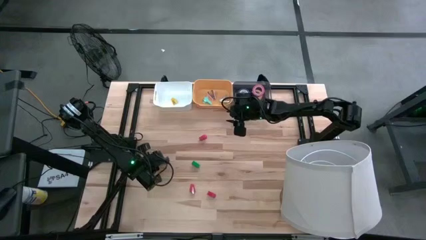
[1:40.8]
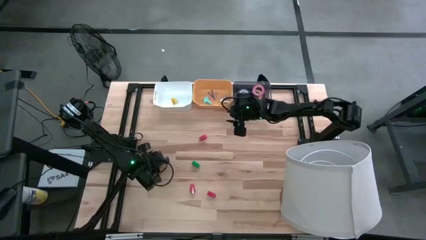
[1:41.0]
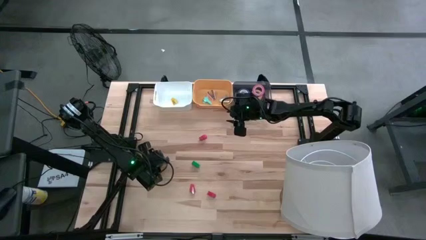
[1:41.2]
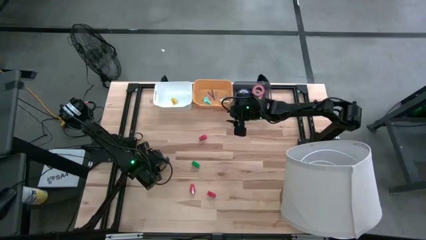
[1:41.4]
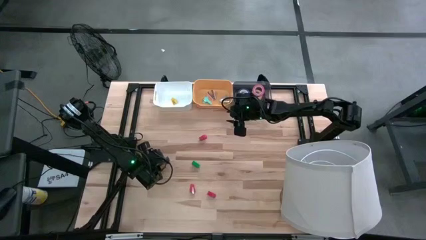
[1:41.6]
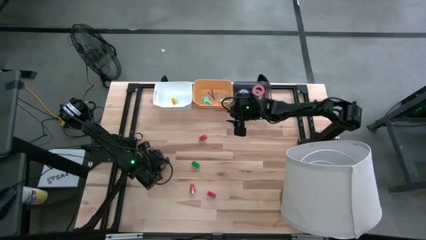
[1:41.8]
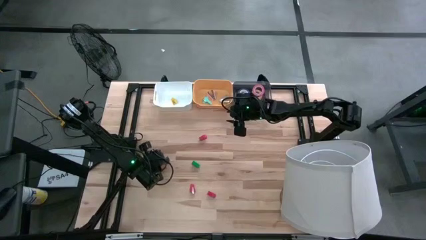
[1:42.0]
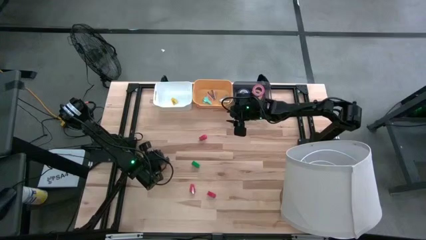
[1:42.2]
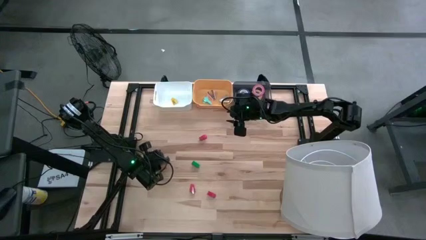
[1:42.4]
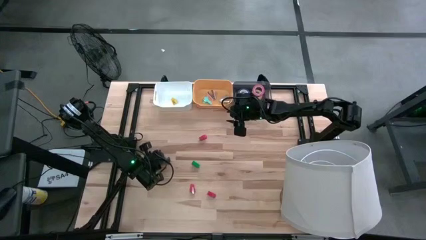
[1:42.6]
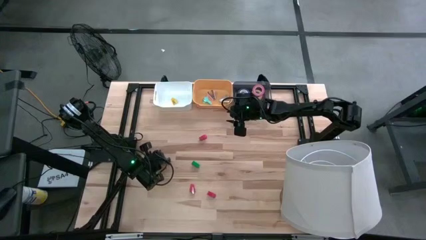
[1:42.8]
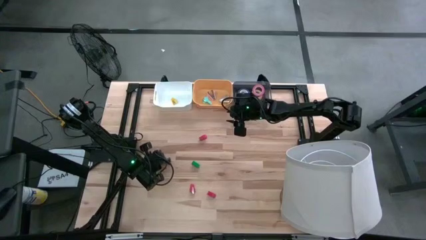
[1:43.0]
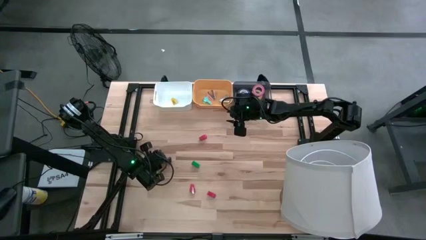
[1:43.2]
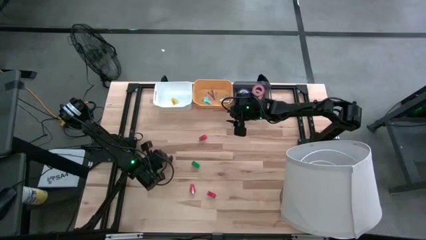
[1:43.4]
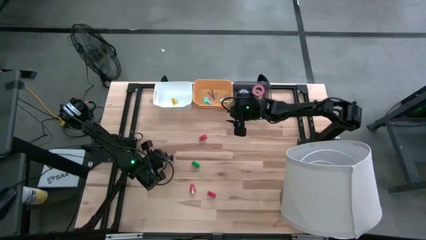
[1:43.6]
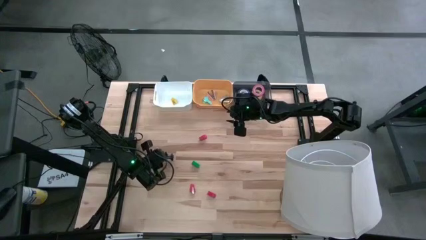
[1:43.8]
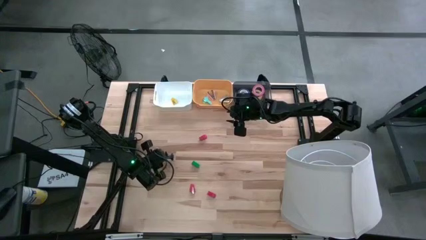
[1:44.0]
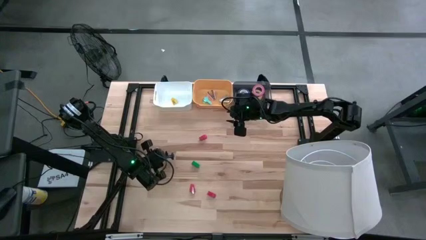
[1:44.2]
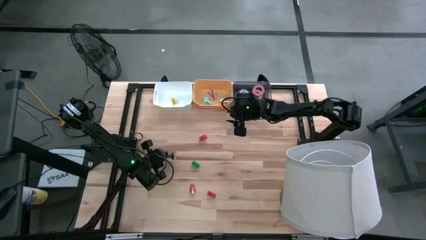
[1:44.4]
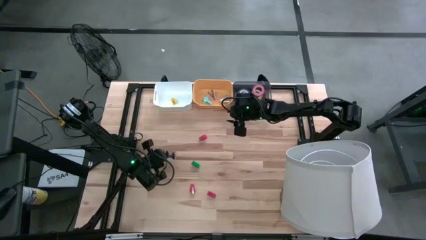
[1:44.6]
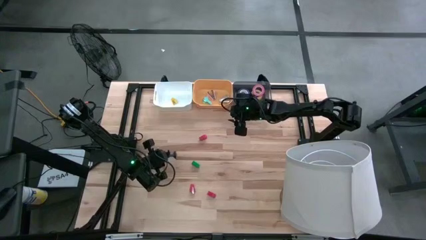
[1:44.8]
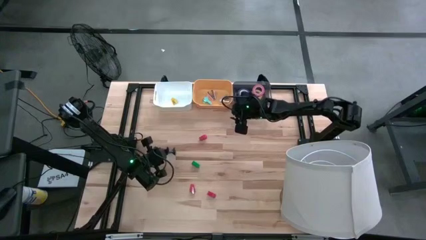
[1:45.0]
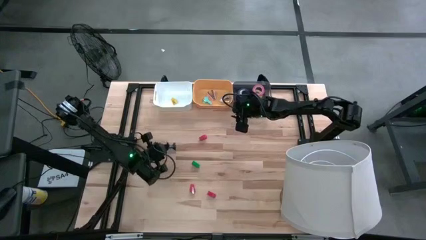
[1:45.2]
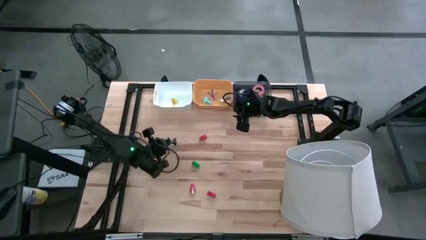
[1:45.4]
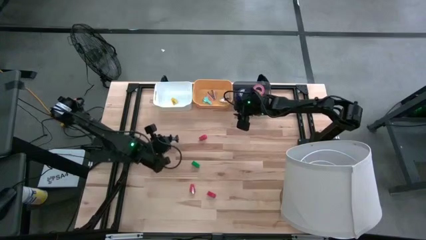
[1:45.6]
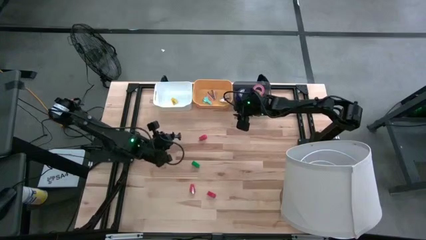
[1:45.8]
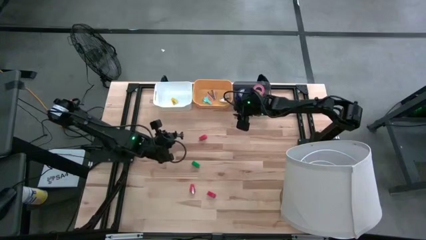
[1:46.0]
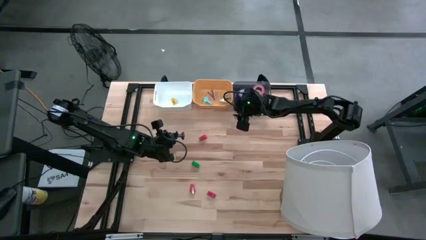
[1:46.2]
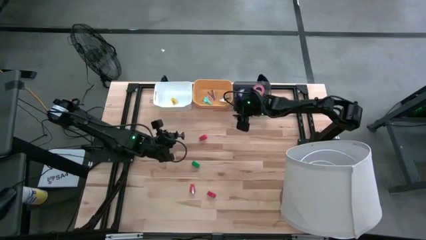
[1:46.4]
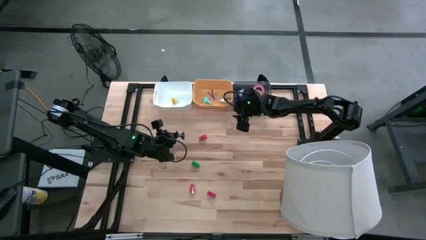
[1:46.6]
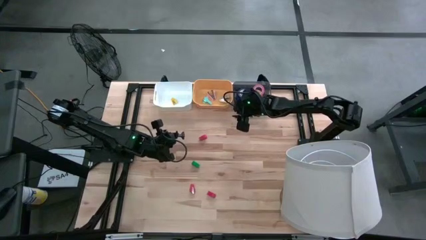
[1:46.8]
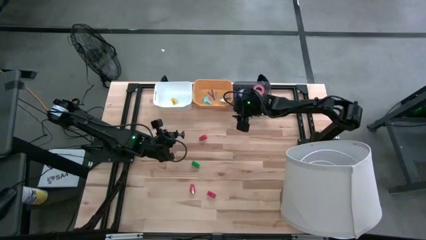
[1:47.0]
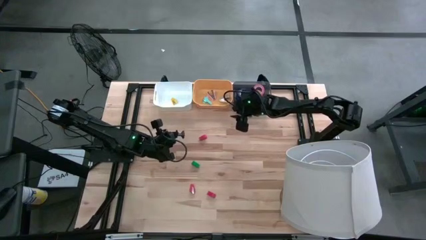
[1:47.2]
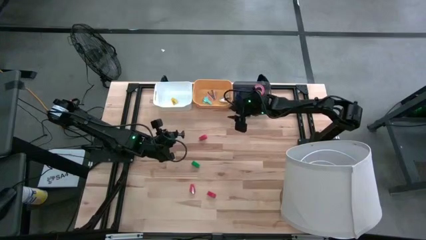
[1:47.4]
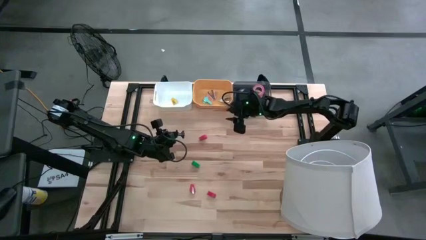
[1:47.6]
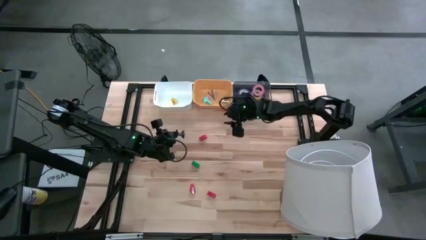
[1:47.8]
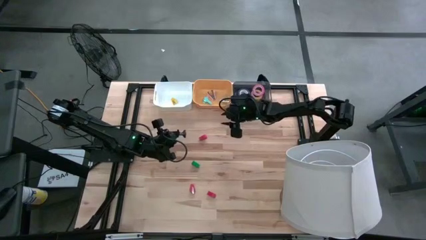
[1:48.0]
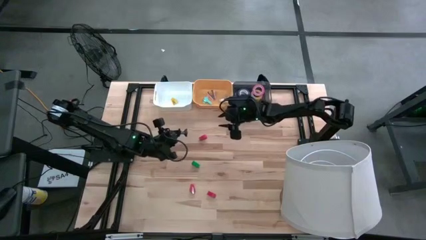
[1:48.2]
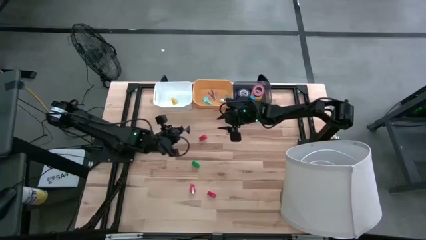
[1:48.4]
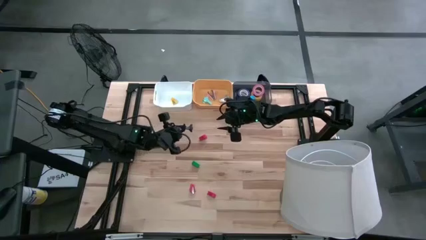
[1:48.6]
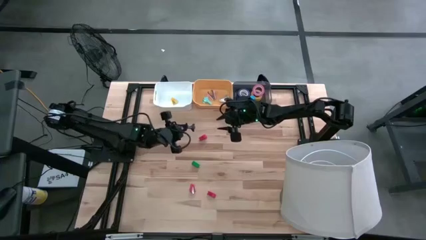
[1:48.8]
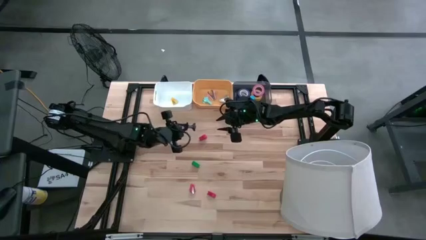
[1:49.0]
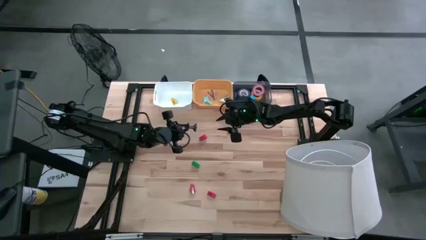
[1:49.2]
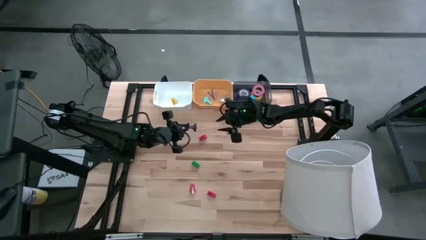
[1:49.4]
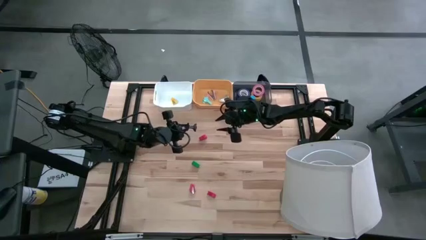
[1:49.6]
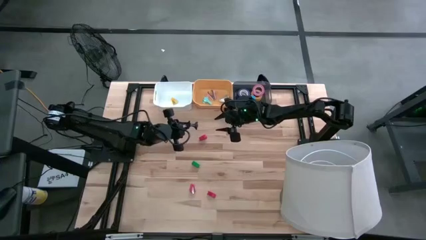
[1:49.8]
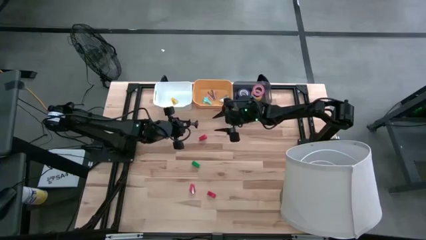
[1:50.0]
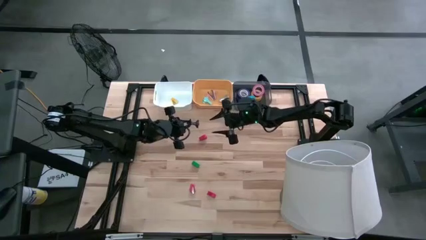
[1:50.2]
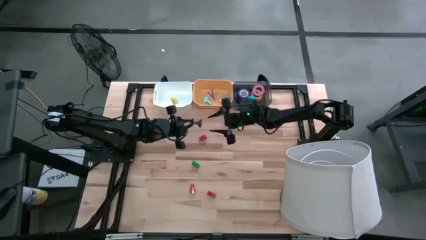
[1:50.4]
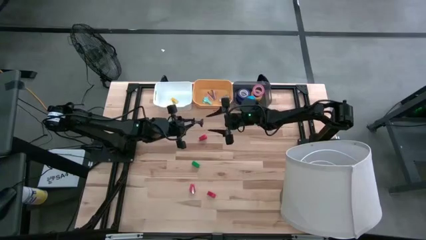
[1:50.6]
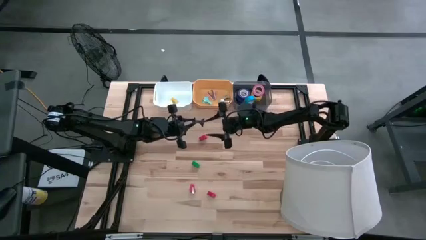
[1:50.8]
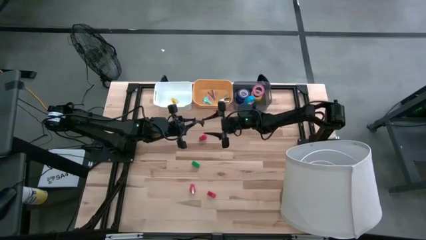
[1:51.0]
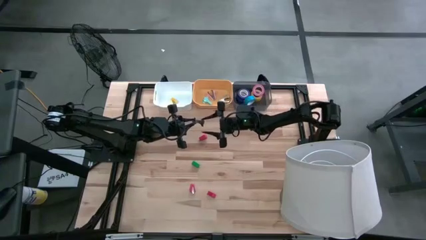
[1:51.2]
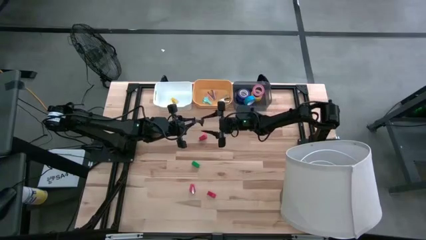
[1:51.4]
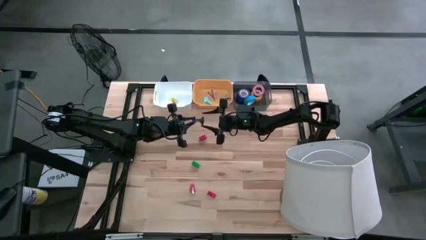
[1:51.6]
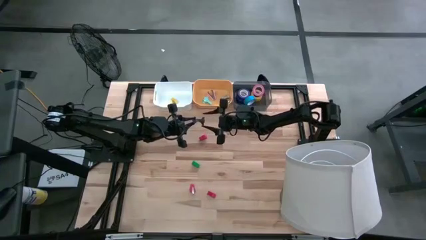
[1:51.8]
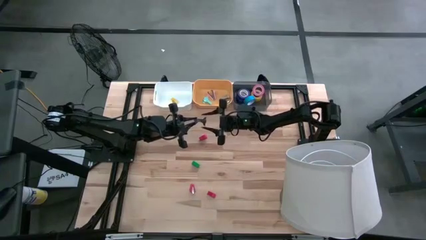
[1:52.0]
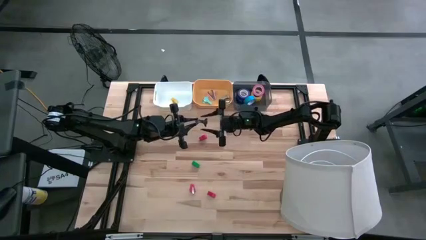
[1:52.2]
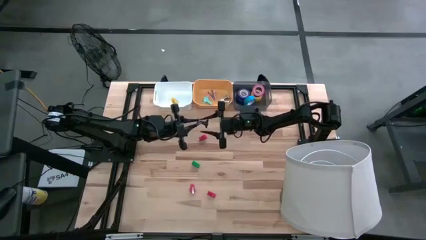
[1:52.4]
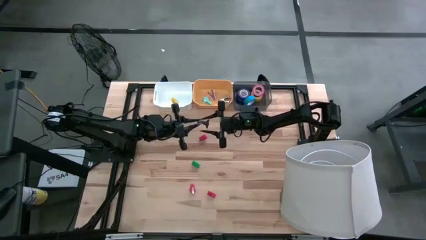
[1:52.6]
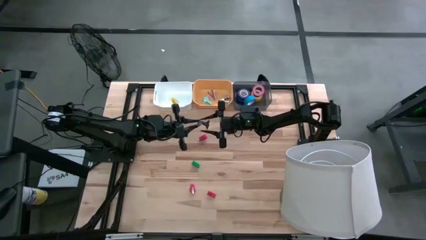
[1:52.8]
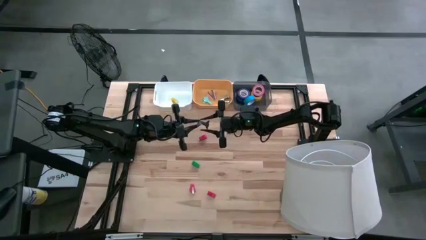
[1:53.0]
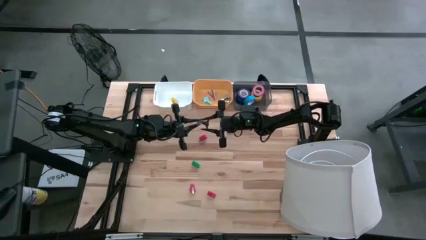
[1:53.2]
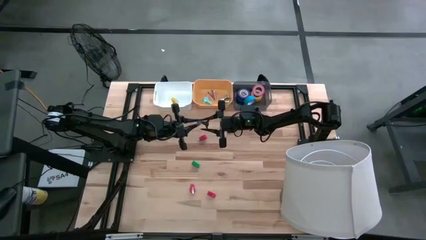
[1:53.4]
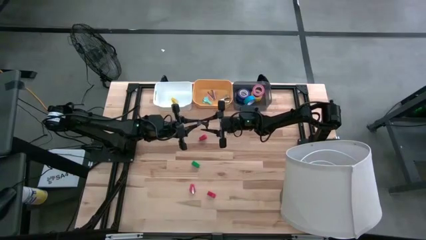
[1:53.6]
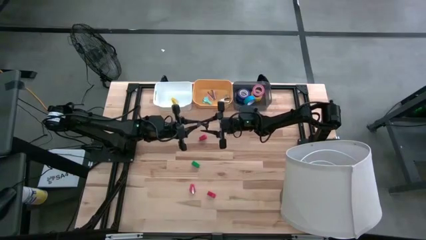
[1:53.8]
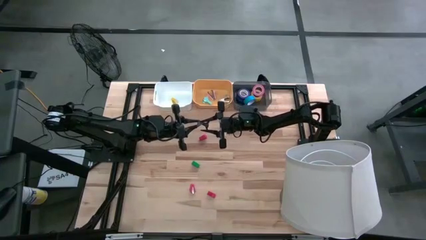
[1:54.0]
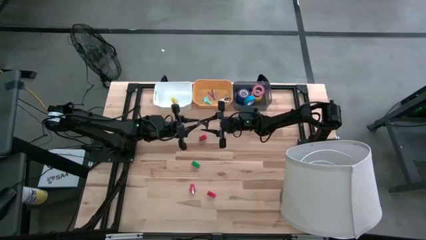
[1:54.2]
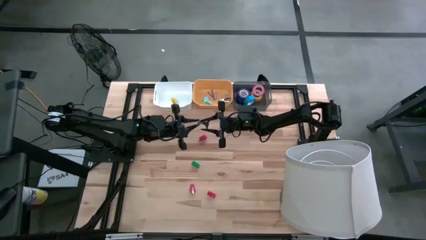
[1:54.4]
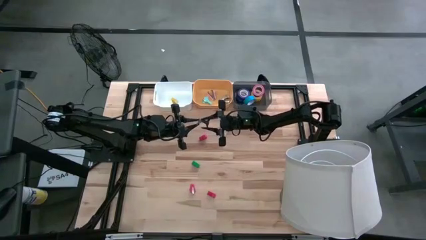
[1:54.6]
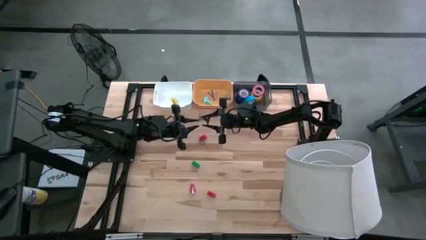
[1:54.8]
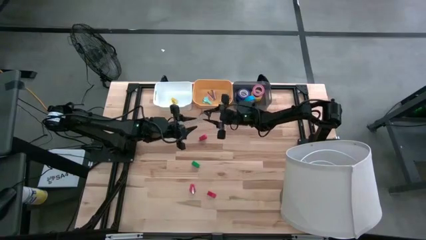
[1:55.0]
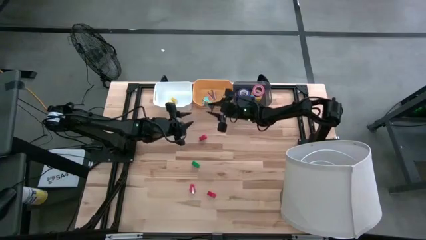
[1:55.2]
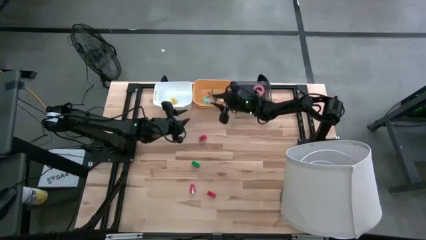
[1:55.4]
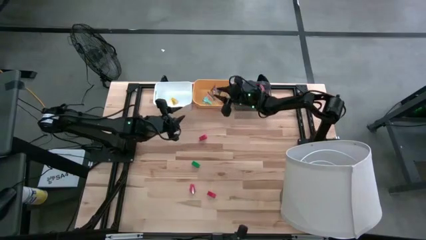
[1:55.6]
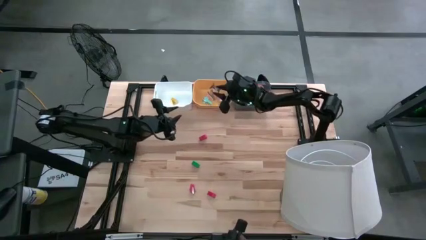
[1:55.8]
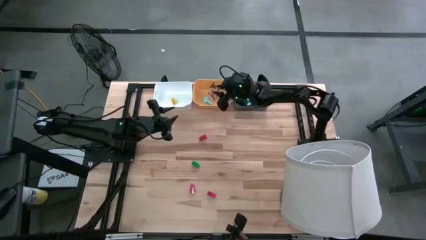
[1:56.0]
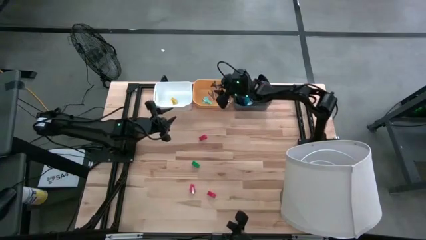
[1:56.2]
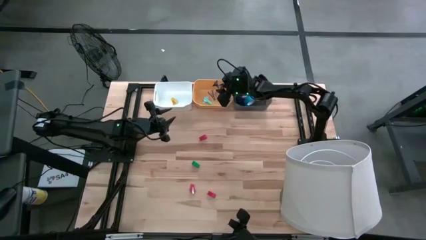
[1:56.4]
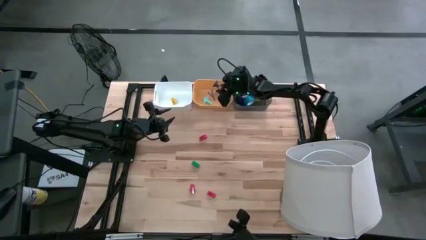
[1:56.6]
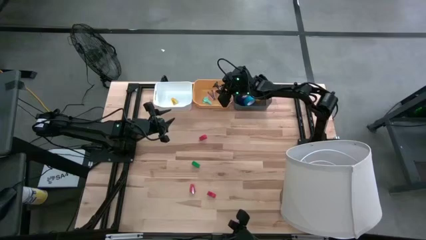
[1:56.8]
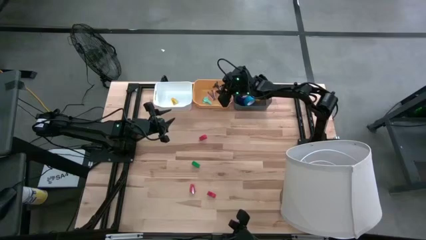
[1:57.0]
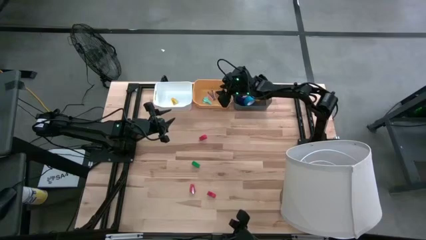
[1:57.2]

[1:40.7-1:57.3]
Task: Pick and place Stapler, Stapler remover, tape
Put the black staple remover into the orange bin
